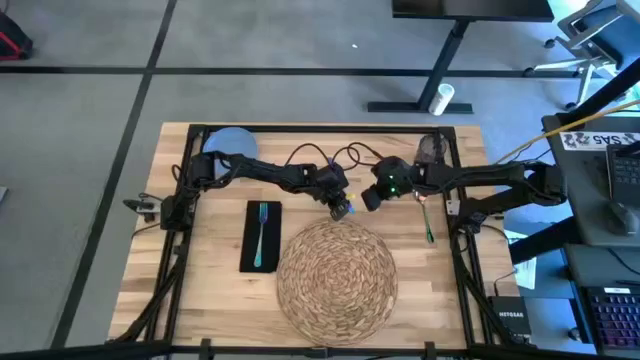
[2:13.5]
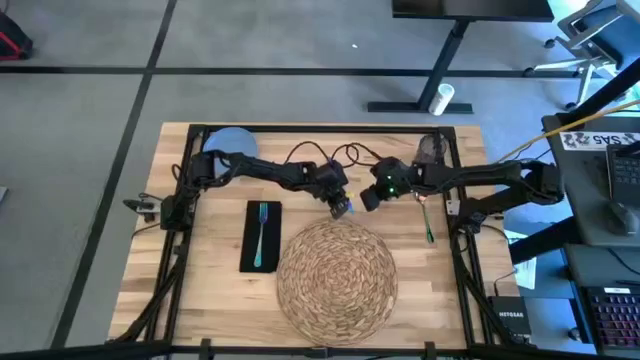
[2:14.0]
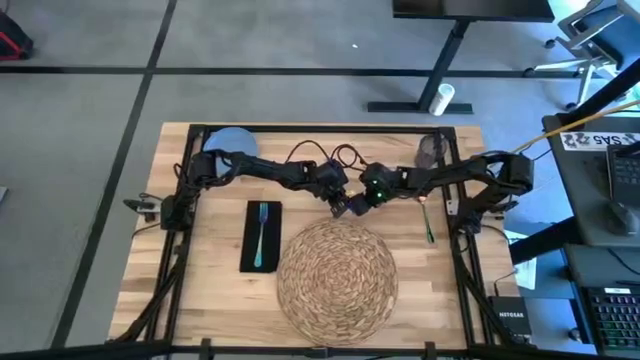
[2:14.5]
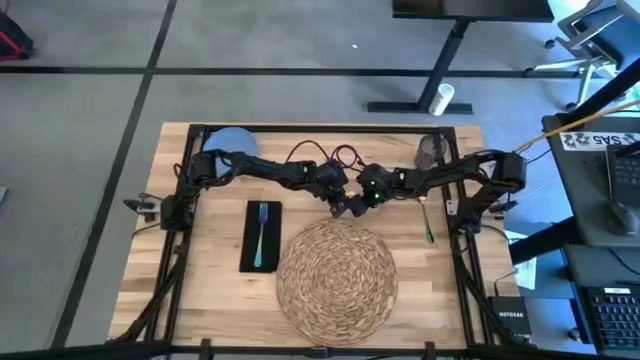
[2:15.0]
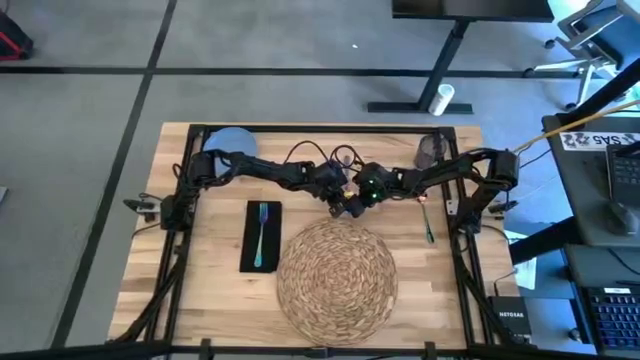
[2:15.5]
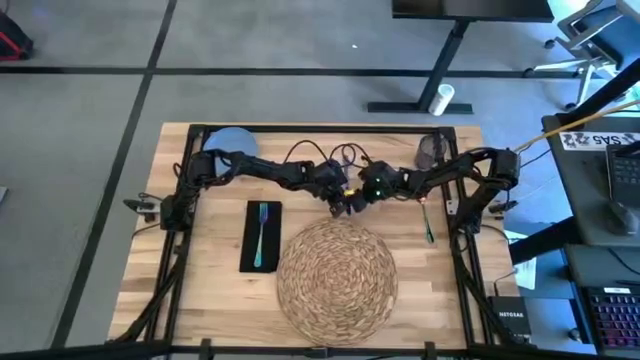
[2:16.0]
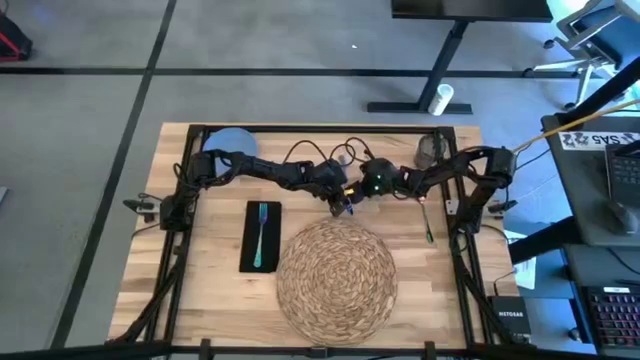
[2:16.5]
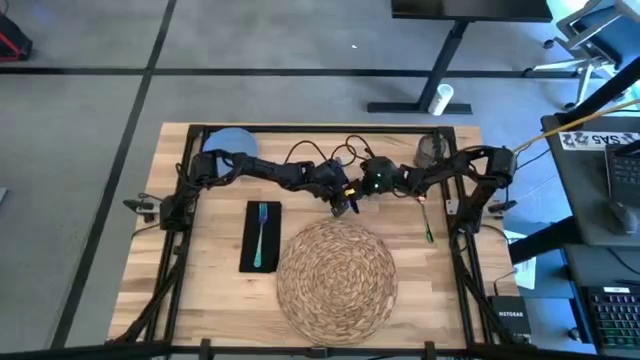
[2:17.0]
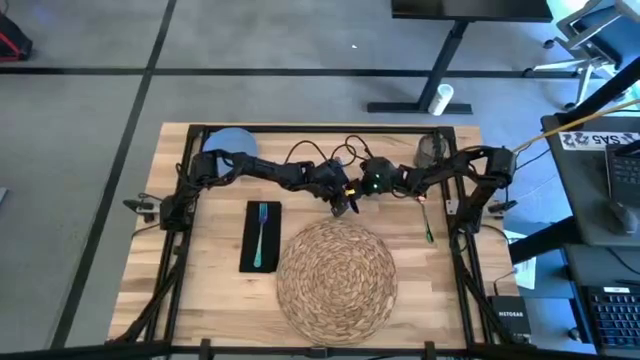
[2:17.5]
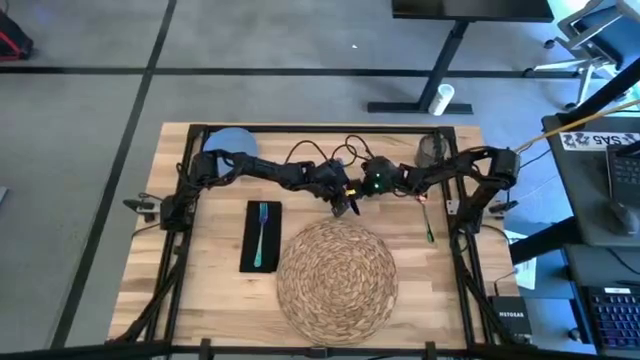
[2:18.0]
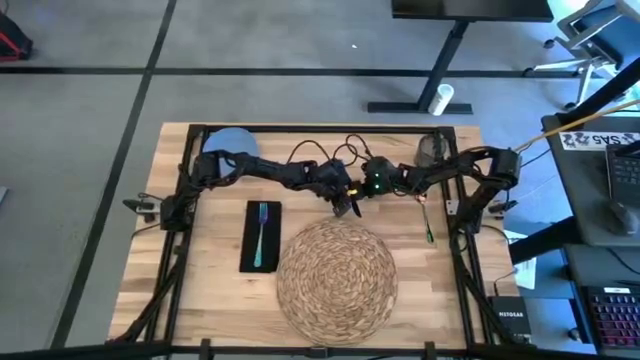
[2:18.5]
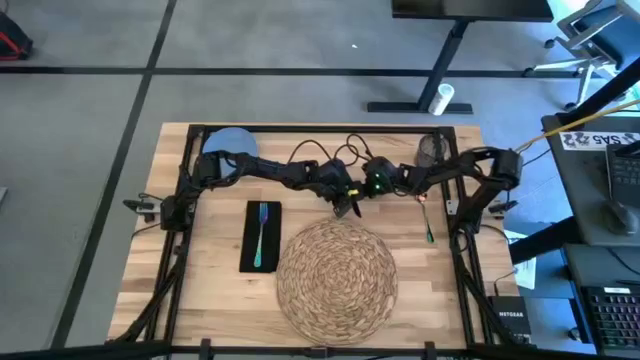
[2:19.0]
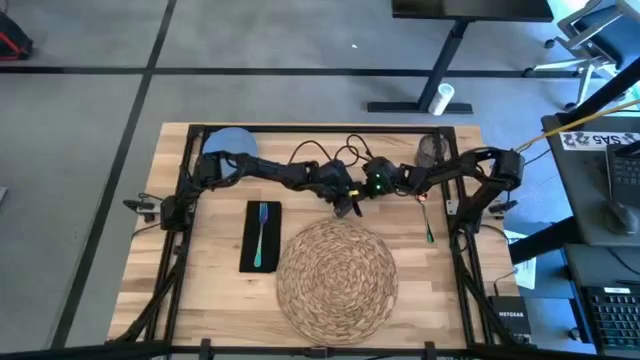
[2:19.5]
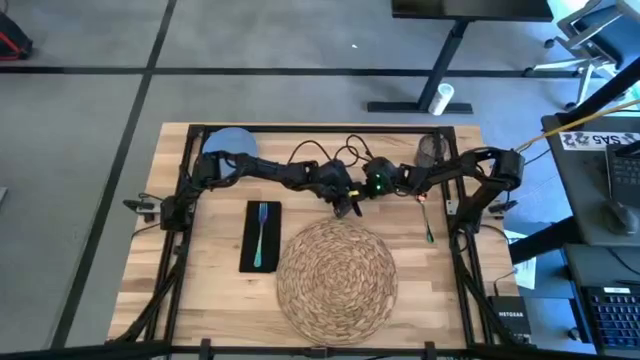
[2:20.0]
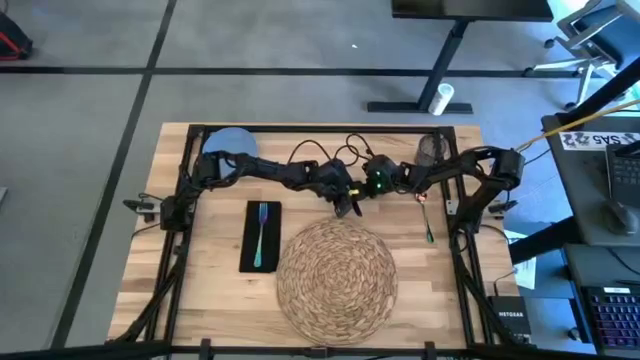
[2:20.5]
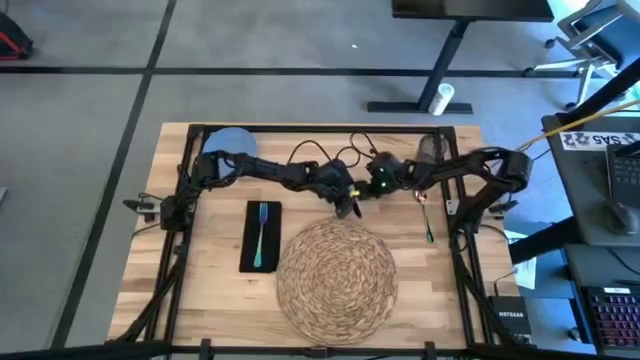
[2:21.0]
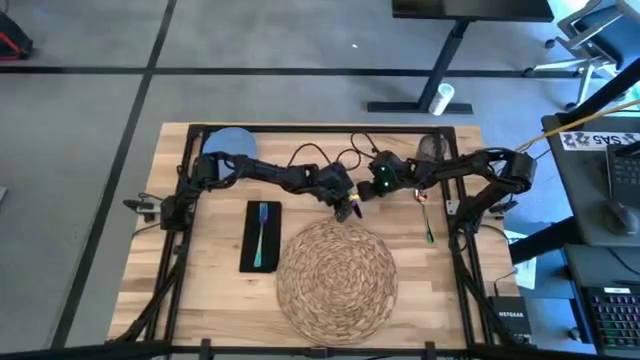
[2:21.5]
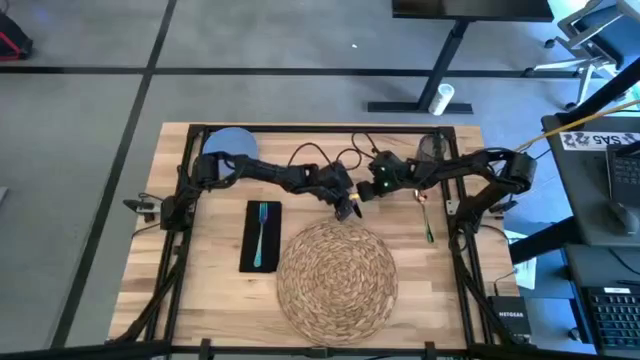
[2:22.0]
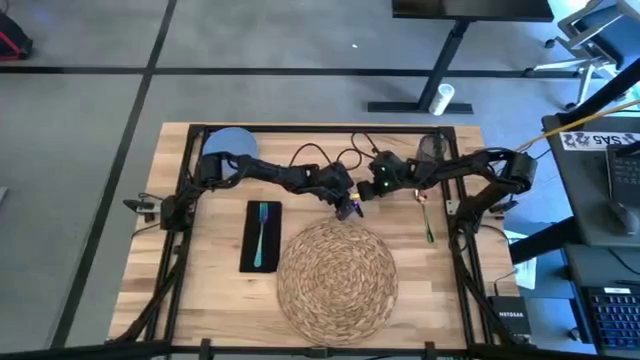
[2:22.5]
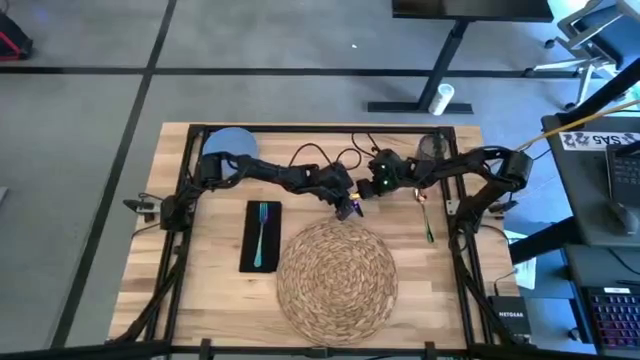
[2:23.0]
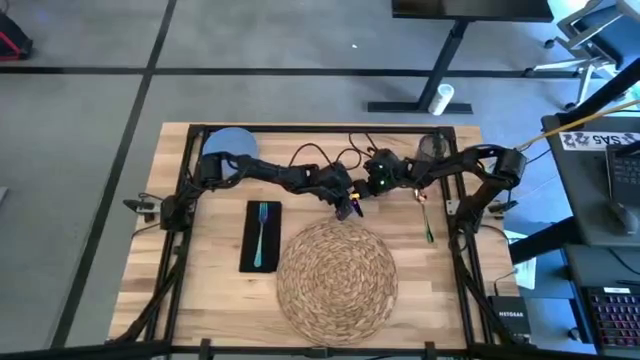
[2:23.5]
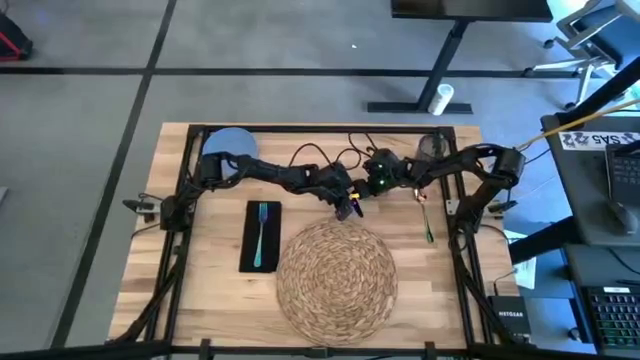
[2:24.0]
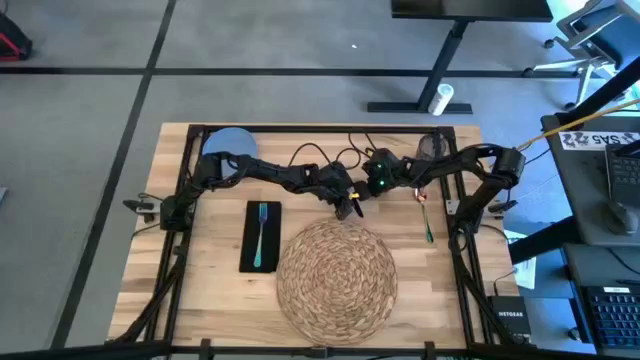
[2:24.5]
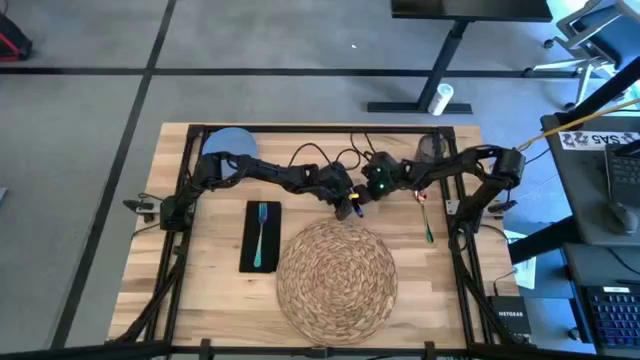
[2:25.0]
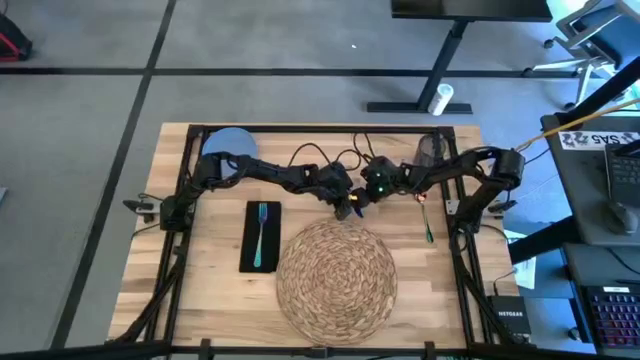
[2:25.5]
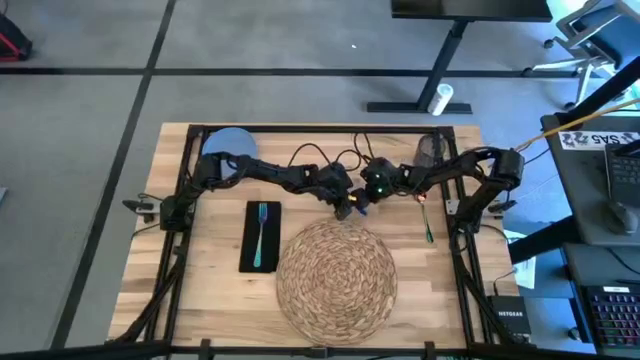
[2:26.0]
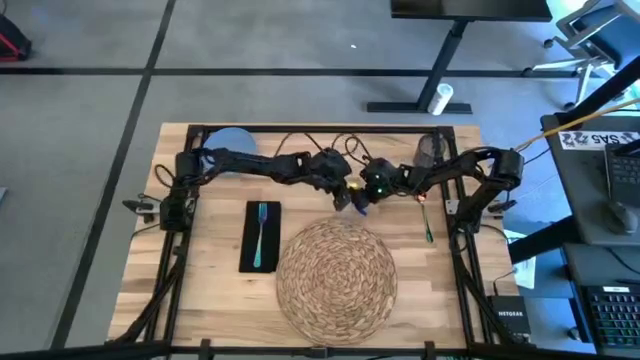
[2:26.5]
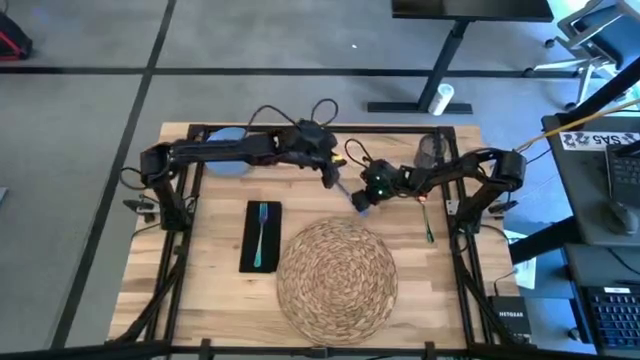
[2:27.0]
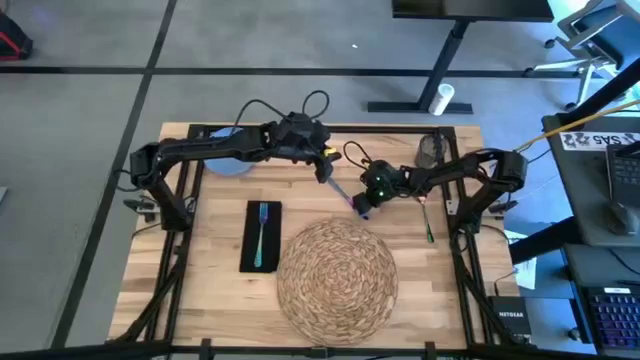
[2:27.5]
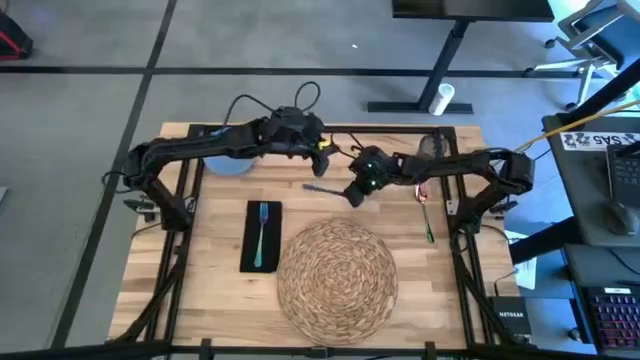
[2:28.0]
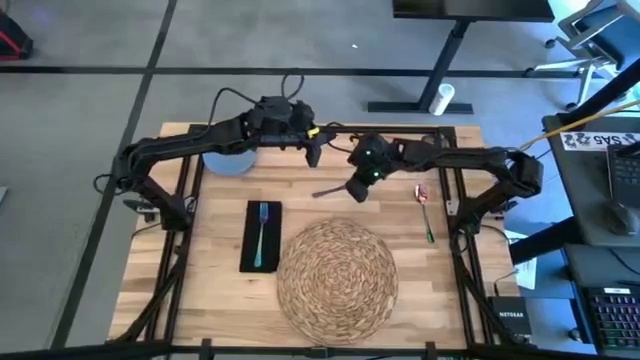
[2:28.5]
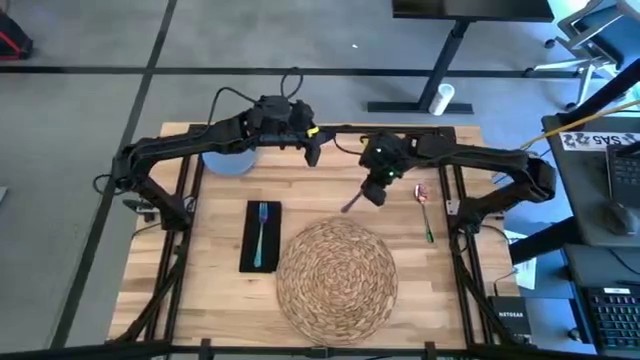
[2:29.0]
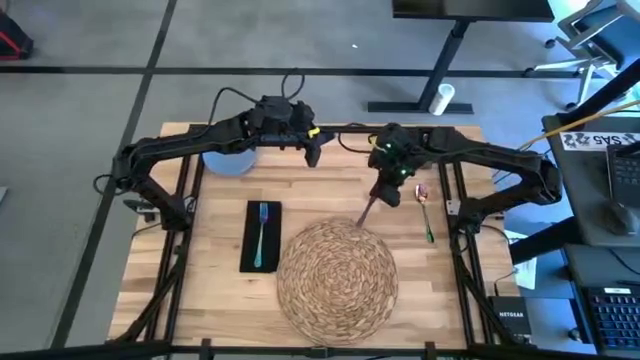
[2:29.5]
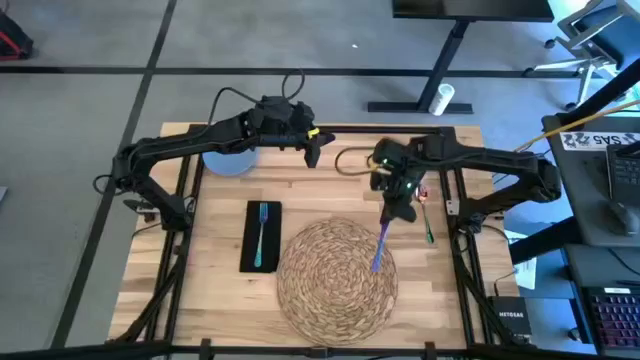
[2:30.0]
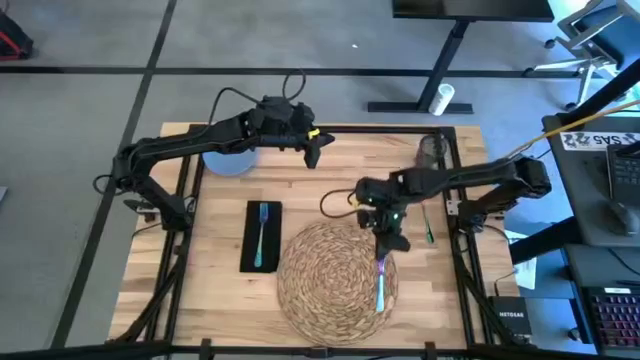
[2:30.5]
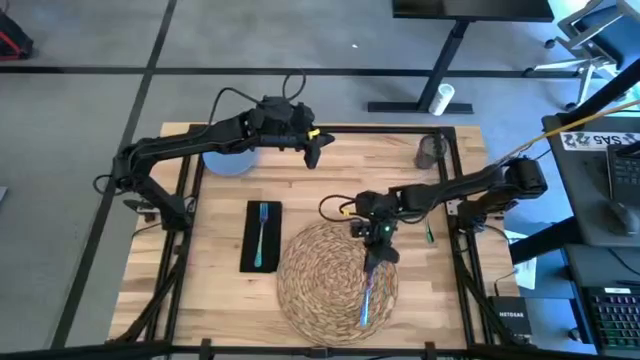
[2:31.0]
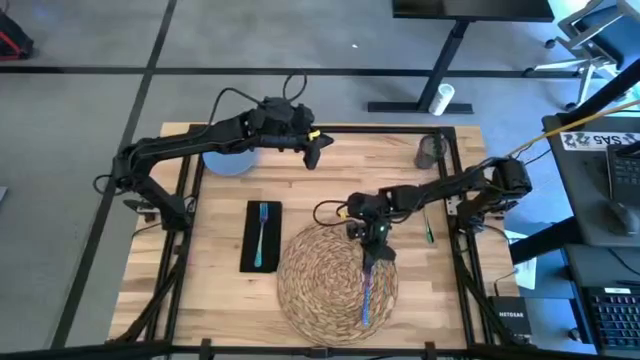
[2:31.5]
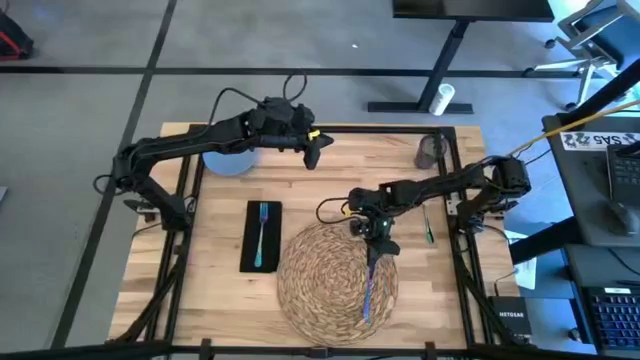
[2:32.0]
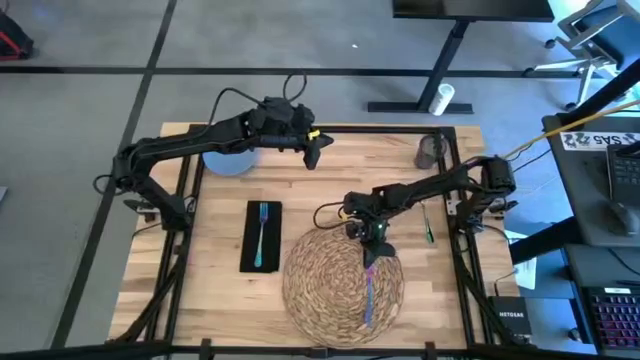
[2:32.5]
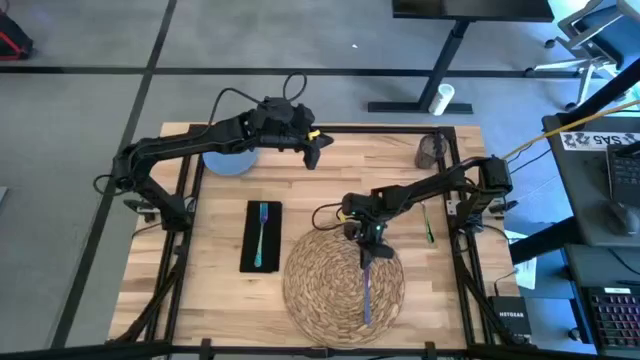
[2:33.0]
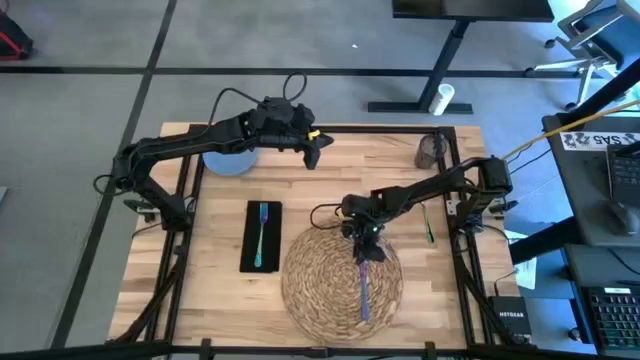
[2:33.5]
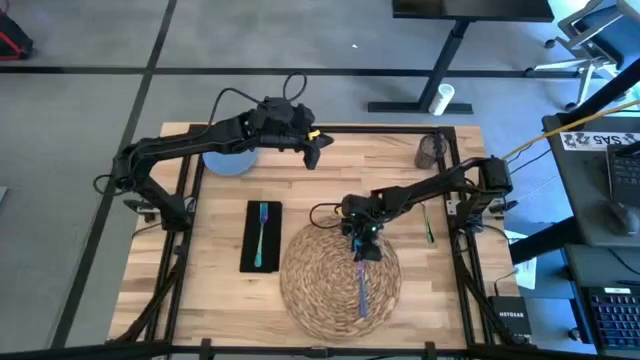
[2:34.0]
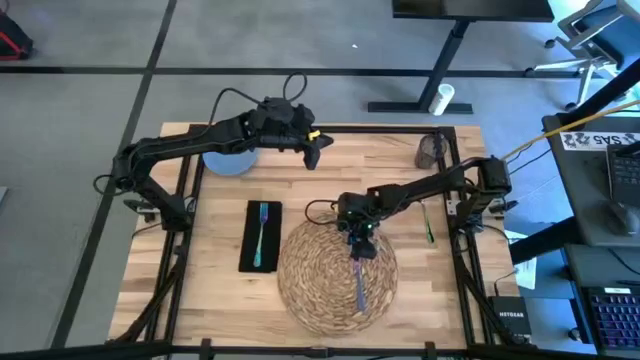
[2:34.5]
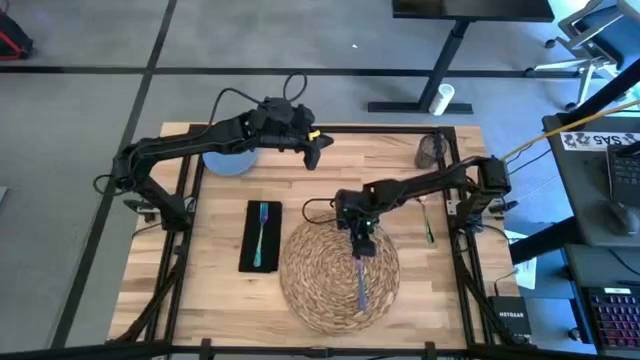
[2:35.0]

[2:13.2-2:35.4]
Task: Set table place
Put the blue table knife on top of the brown placemat

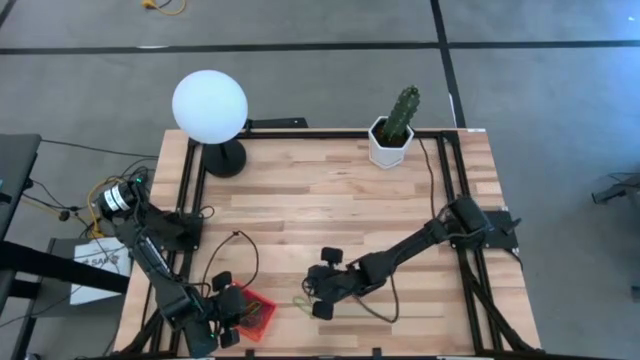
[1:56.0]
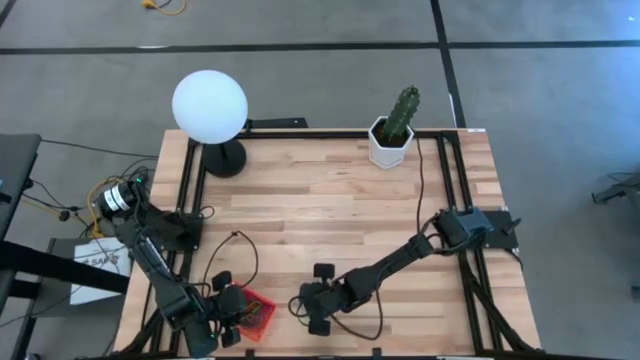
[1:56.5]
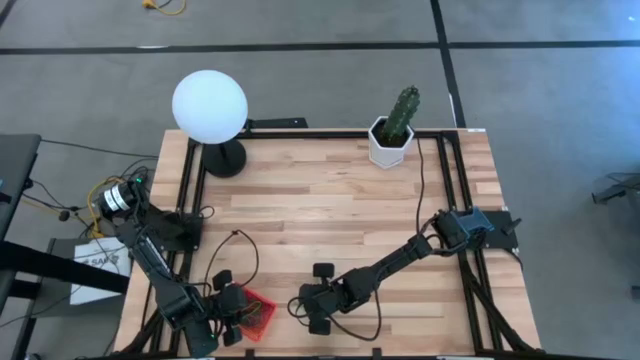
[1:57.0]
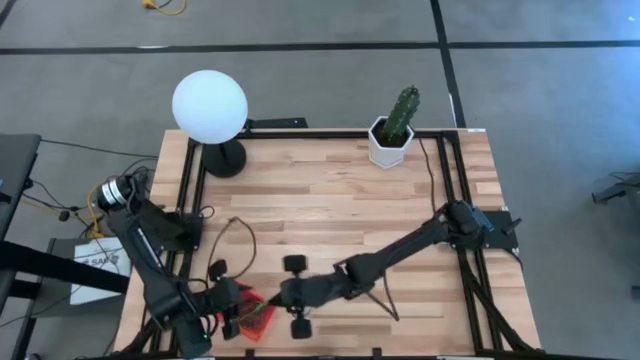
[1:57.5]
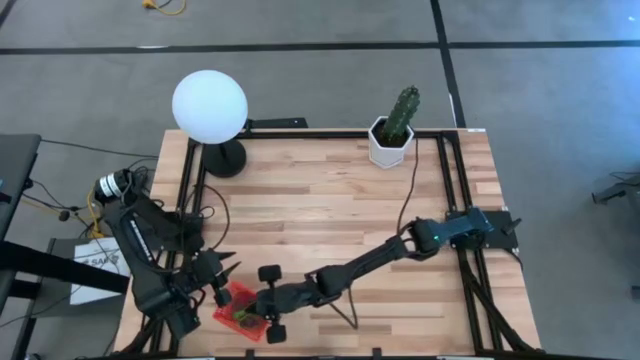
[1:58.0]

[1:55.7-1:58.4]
Task: Pick and place rubber bands into bin
Put the green rubber band into the basket
